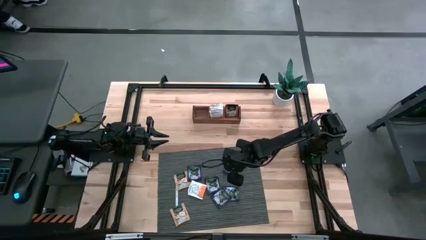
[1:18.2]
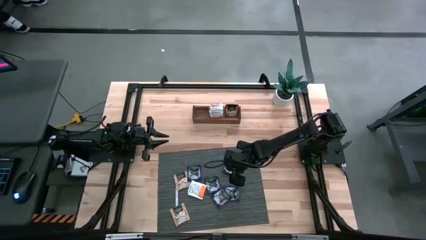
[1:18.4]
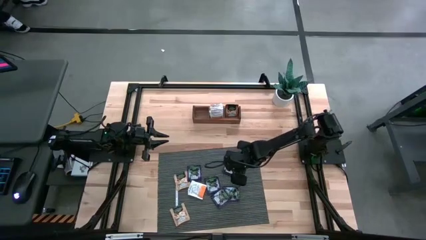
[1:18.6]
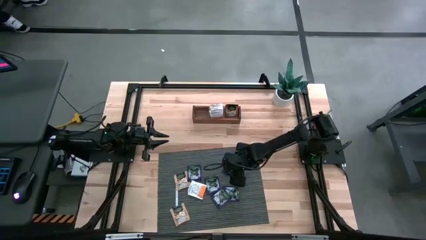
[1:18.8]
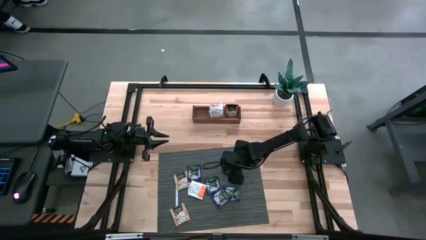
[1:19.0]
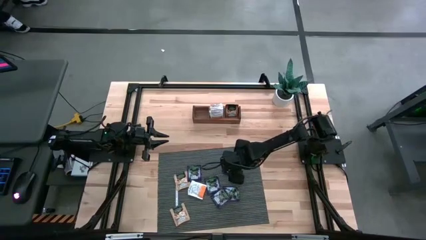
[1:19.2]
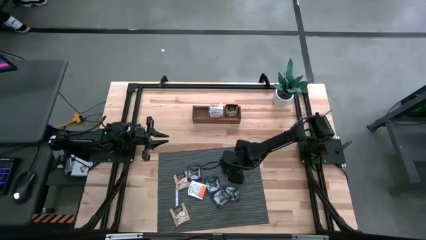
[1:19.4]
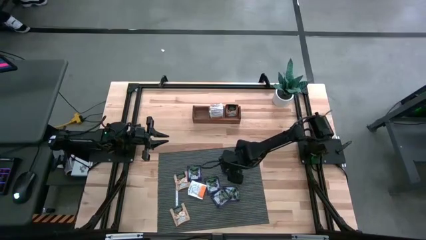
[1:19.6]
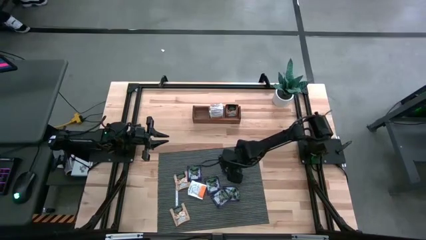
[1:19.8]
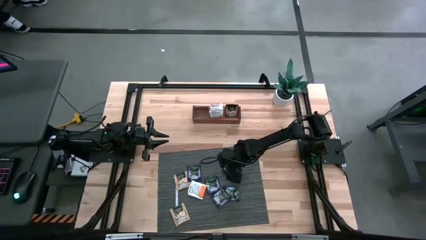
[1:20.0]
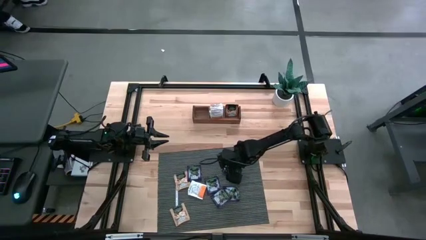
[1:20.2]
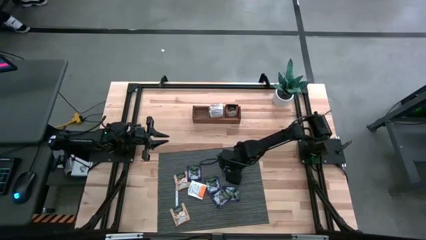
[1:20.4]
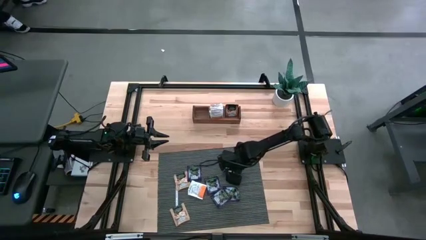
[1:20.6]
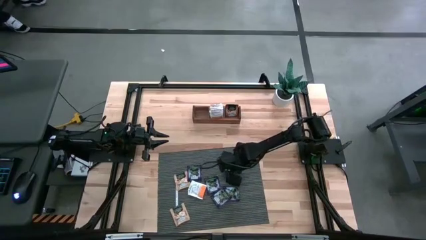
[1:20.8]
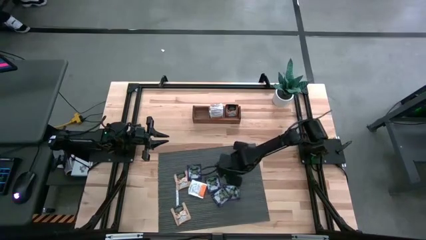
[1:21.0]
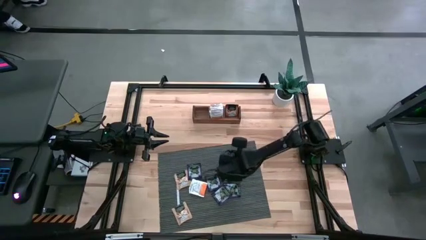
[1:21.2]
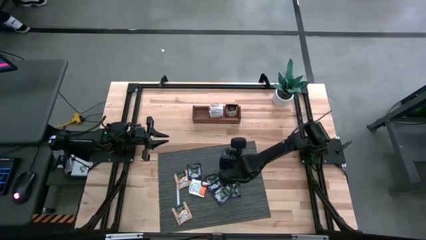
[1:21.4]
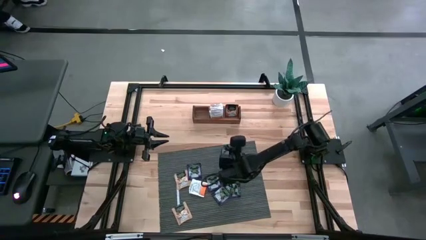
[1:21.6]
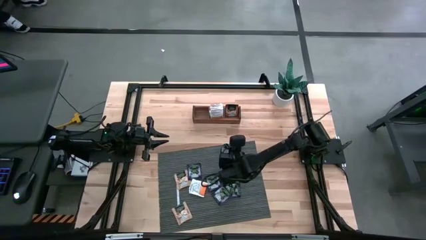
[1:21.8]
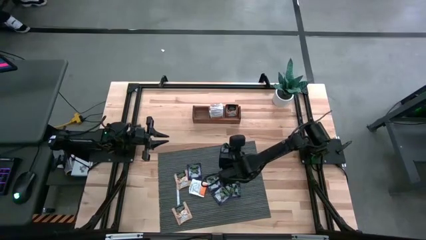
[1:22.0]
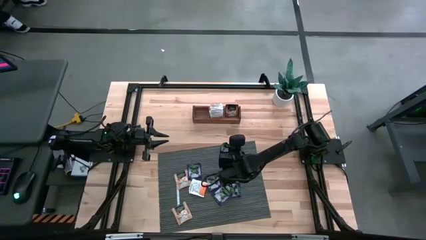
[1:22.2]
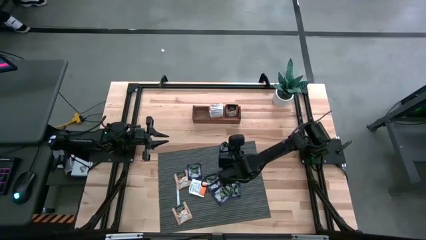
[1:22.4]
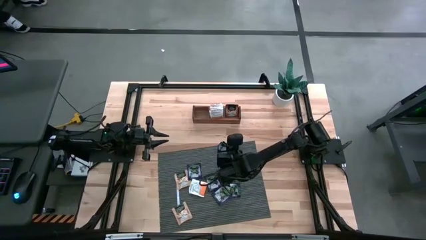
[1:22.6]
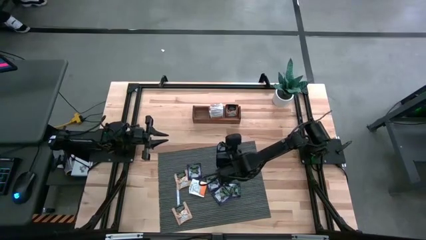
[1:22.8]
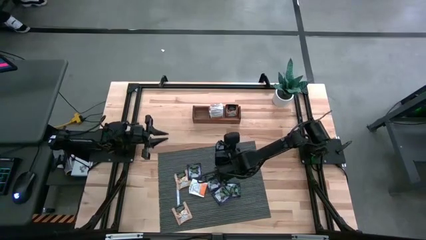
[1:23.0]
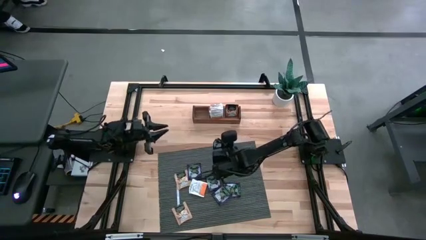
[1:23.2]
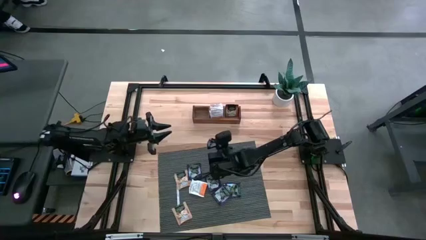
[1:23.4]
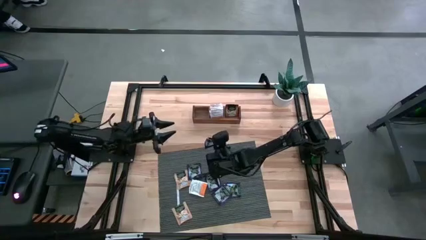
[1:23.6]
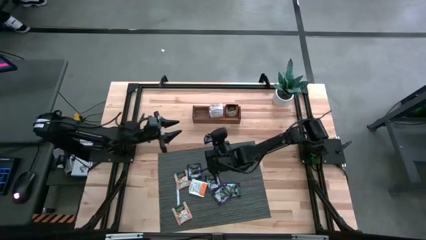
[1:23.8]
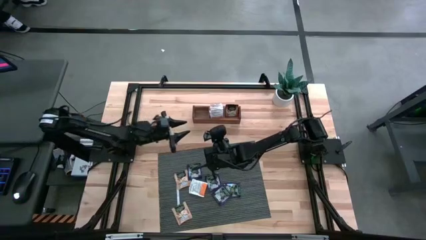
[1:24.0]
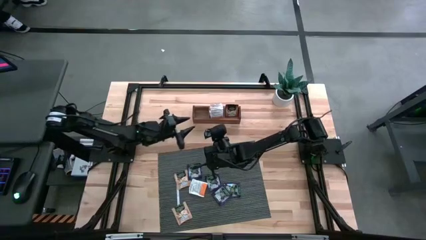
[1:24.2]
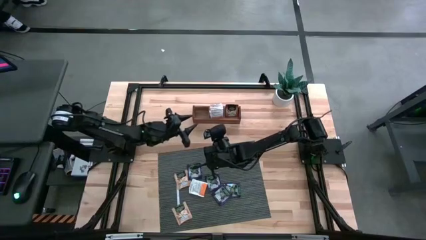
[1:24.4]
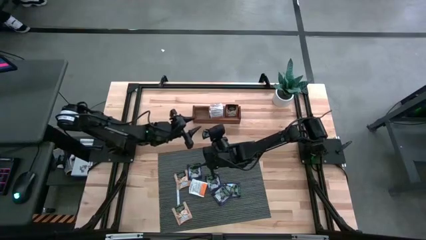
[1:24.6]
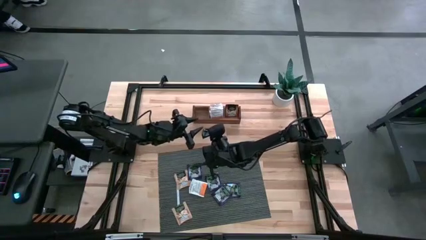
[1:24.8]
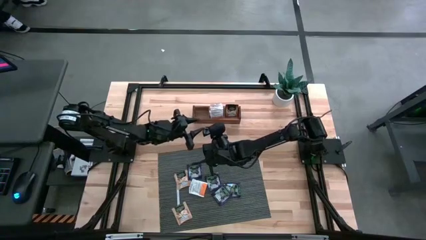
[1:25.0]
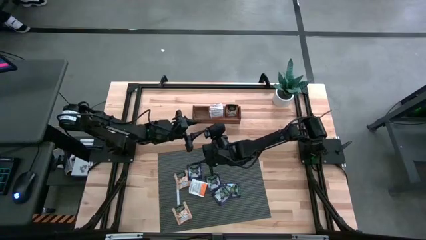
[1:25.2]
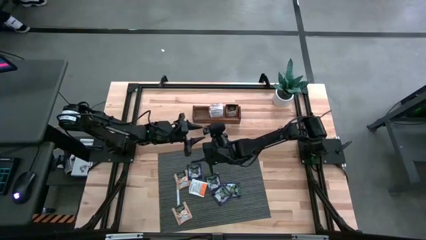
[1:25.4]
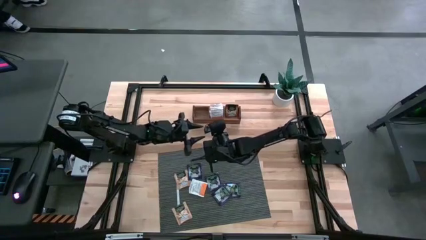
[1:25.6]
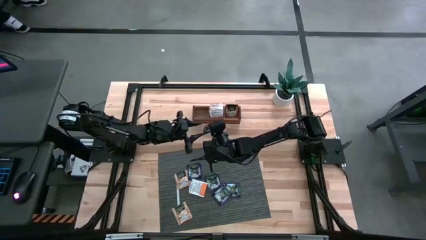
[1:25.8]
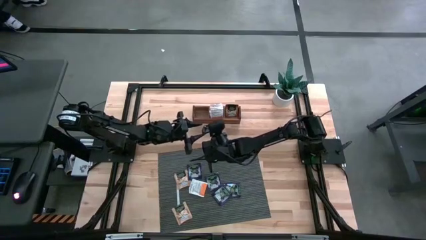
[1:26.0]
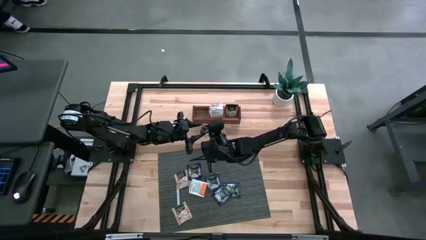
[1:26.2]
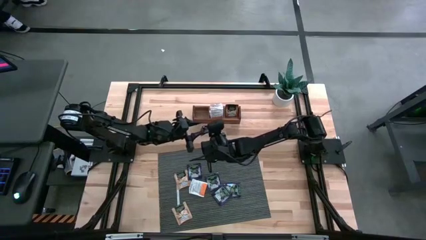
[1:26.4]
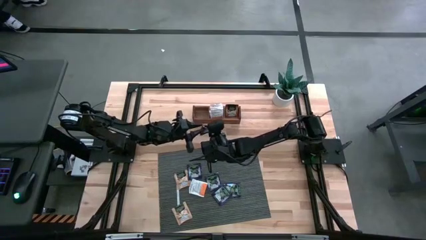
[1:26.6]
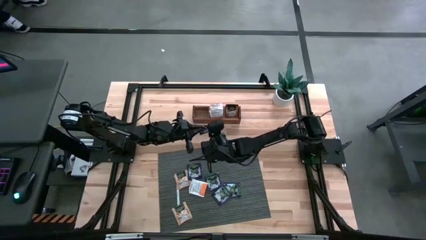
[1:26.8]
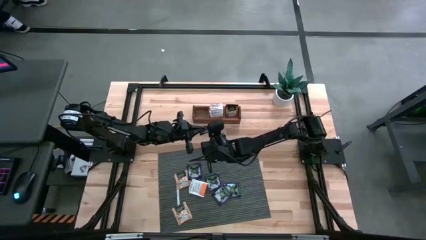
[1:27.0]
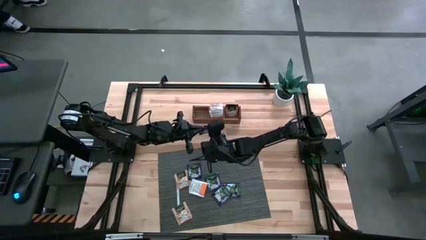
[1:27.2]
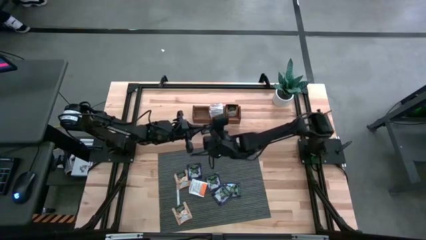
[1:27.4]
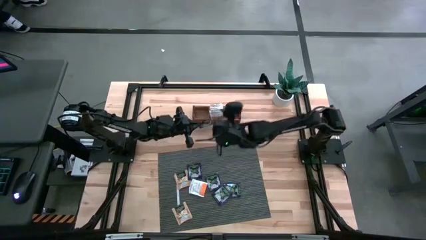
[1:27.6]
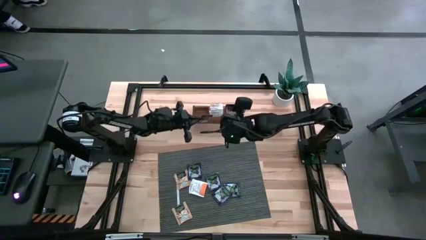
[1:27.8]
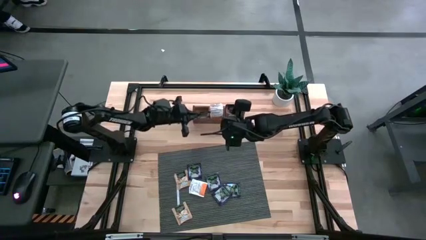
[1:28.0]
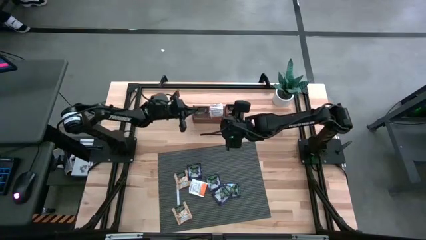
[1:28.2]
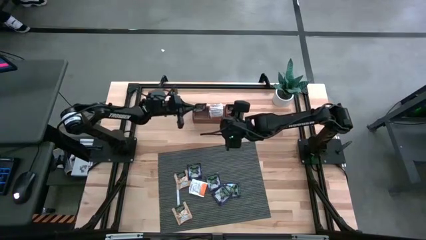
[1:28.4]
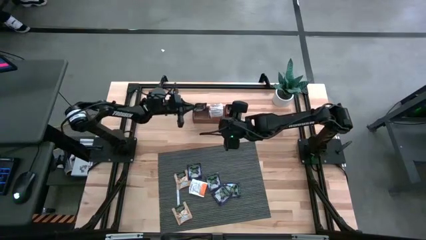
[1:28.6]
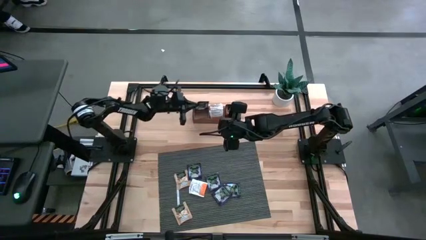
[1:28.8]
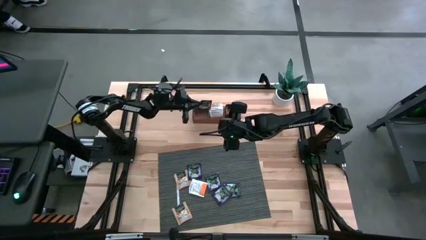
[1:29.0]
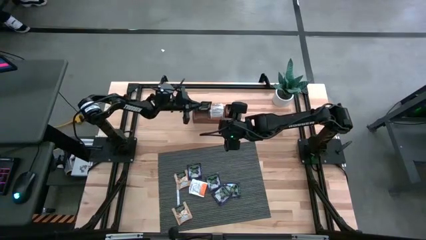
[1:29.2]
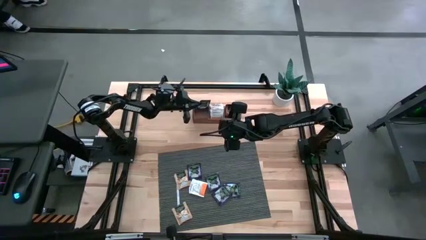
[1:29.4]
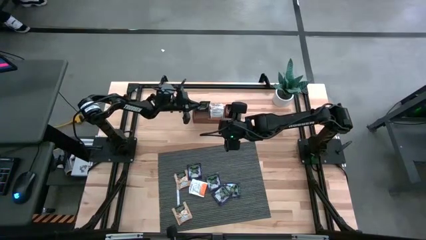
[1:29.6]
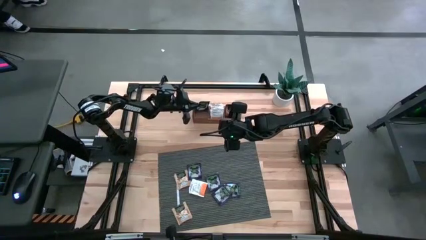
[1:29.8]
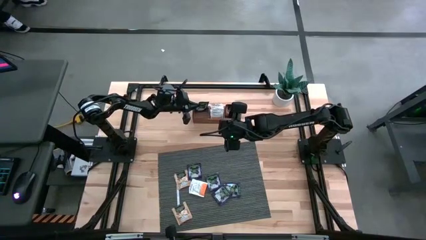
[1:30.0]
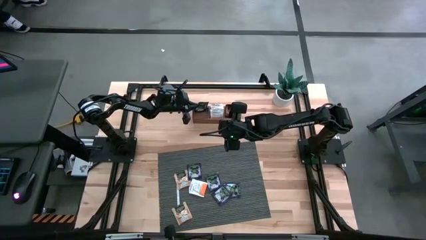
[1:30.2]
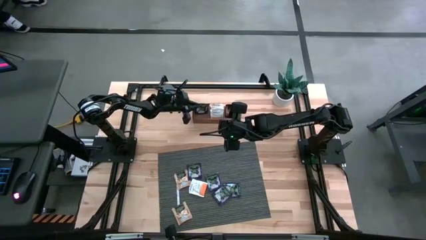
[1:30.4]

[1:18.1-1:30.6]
Task: Pick & Place Tea
Put the purple tea bag into the left compartment of the wooden organizer

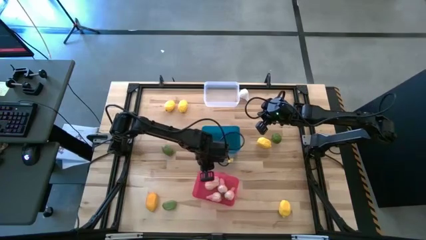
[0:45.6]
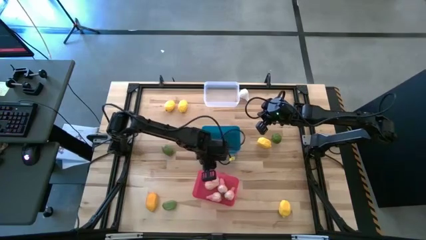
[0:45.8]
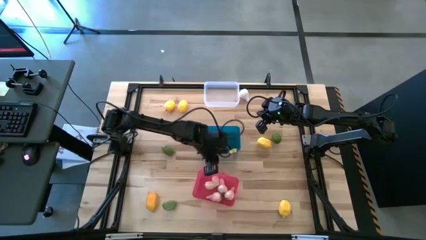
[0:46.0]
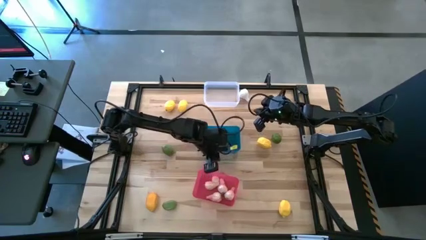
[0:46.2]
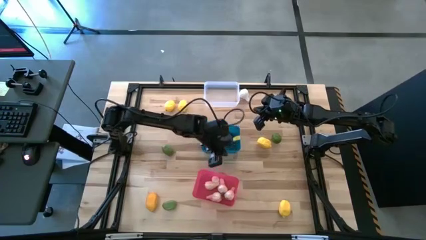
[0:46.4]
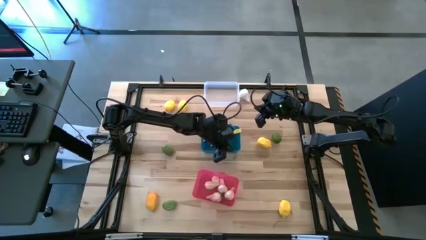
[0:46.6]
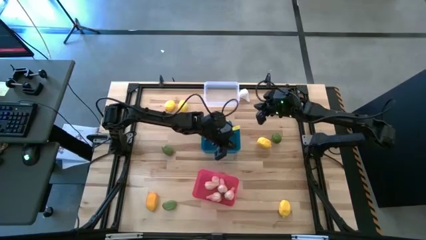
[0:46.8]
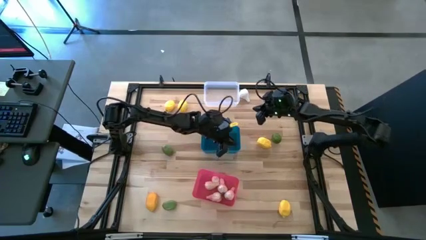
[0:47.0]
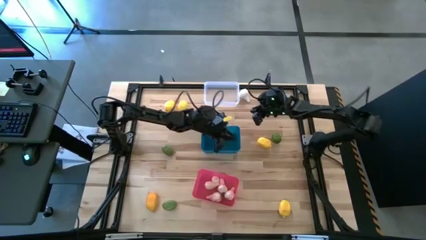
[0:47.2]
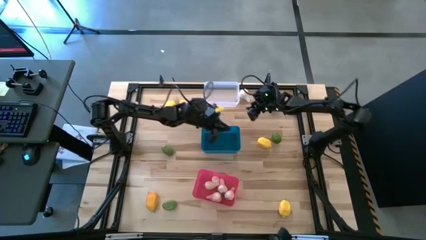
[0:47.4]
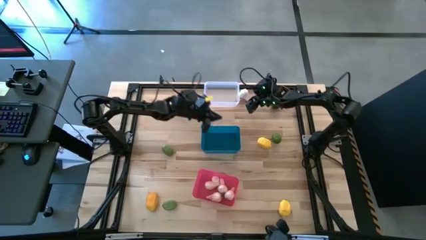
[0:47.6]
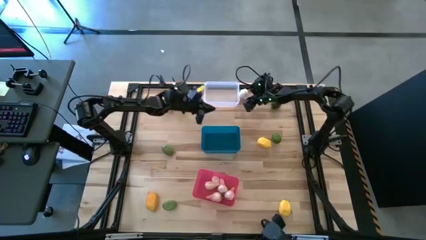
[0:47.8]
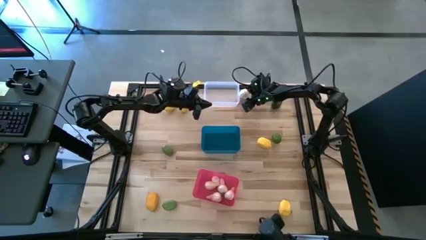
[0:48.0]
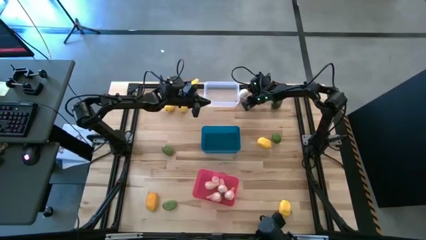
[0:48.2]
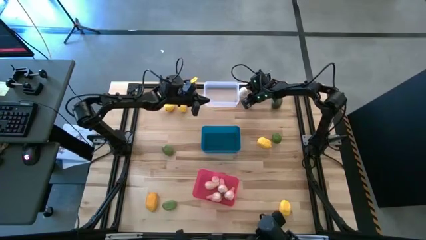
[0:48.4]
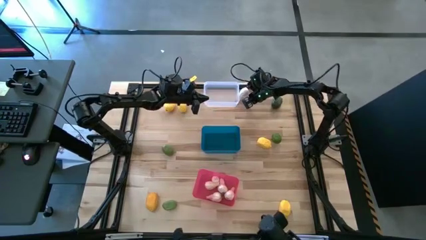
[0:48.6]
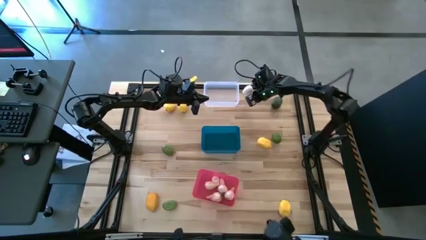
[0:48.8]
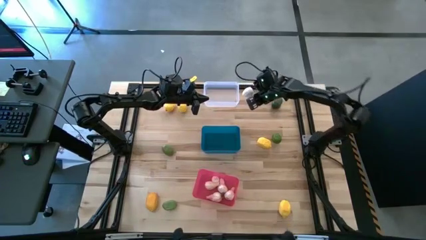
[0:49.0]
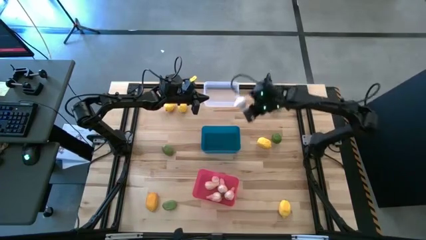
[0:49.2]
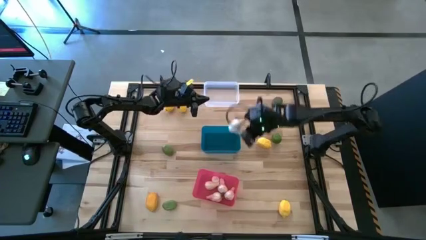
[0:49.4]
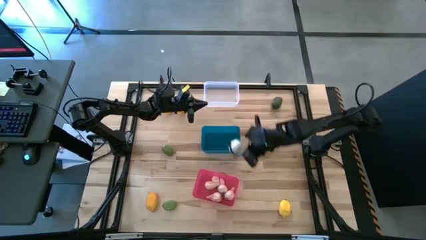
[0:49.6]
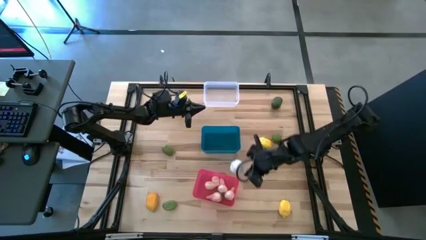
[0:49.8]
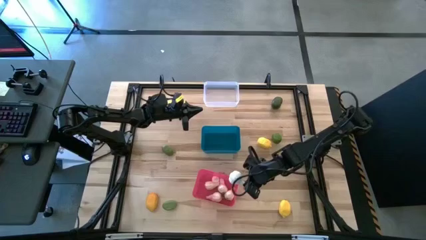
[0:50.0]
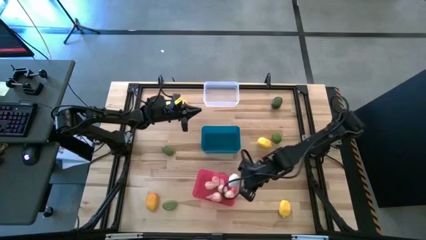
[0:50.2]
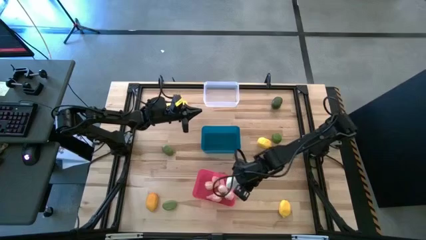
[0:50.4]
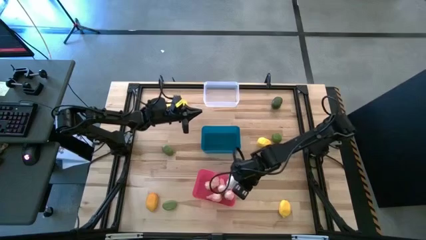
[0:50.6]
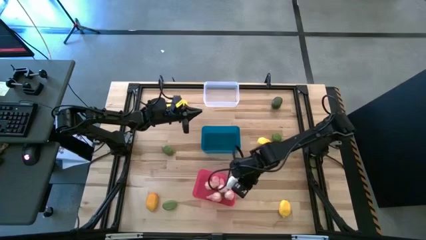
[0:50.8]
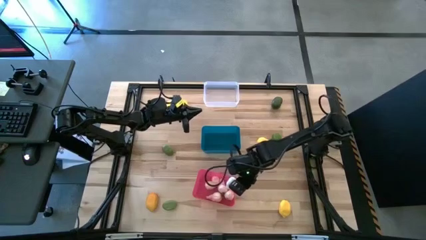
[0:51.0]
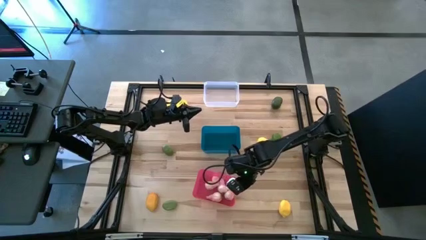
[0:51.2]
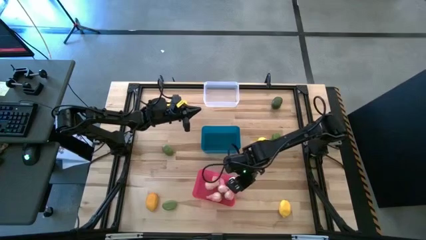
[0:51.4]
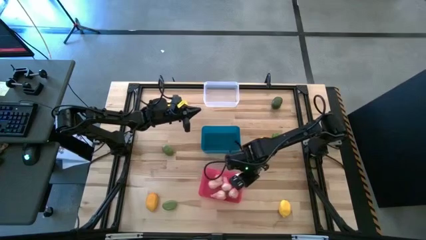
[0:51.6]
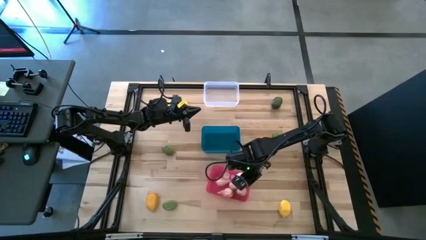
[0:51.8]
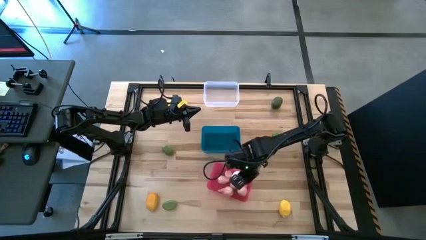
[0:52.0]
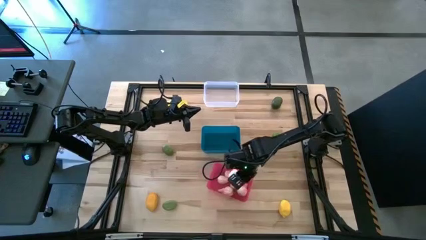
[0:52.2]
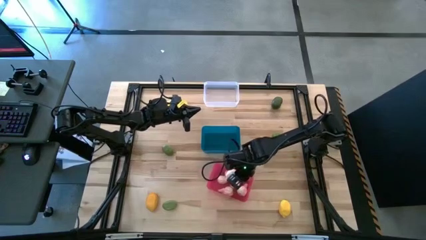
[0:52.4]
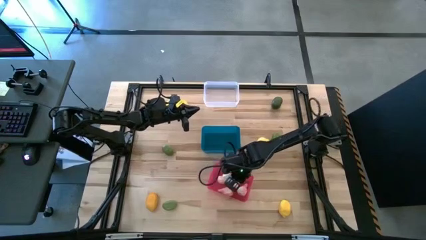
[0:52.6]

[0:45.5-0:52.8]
Task: Sort produce into baskets
Put the white garlic into the pink bin
